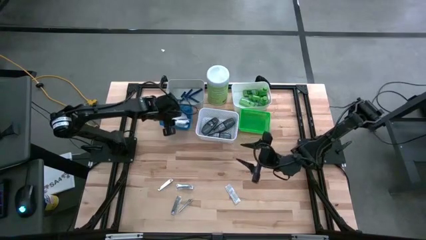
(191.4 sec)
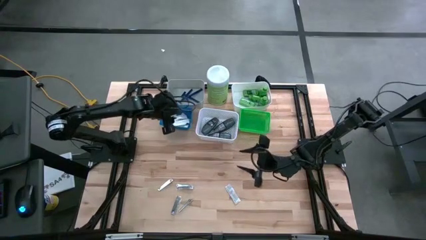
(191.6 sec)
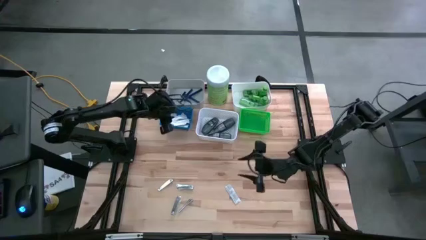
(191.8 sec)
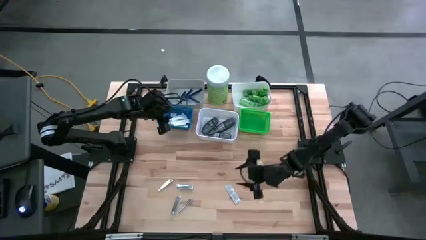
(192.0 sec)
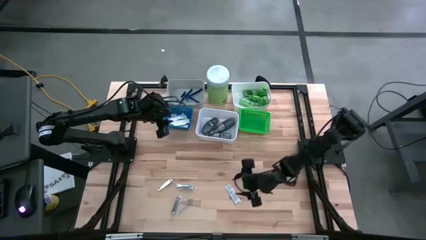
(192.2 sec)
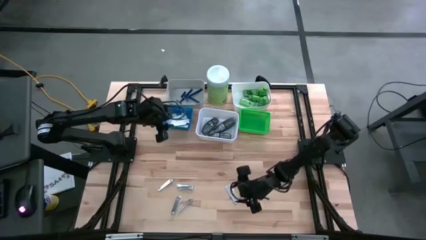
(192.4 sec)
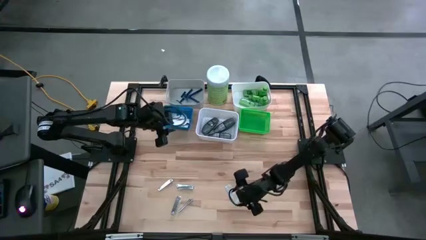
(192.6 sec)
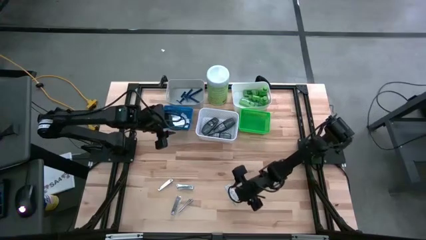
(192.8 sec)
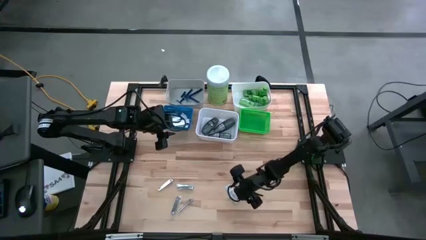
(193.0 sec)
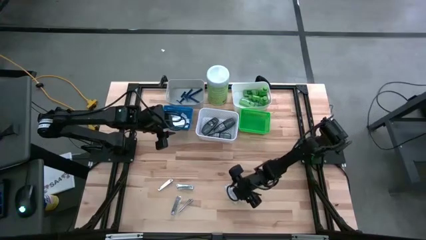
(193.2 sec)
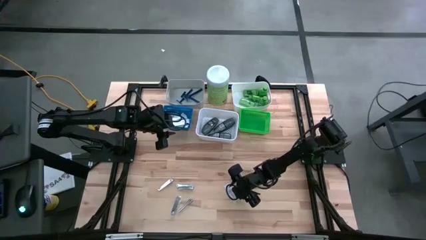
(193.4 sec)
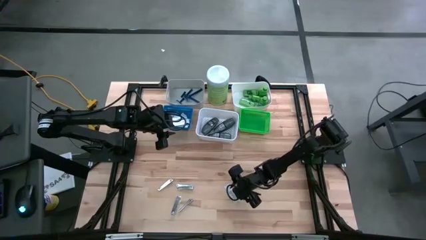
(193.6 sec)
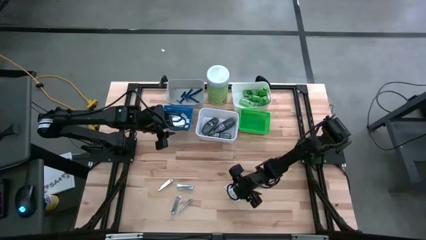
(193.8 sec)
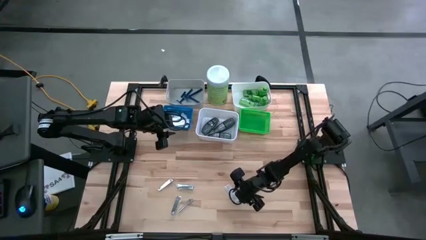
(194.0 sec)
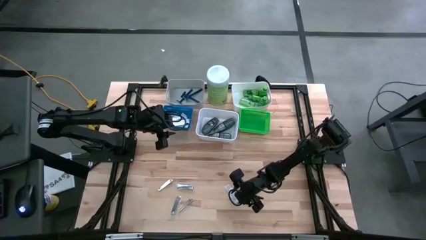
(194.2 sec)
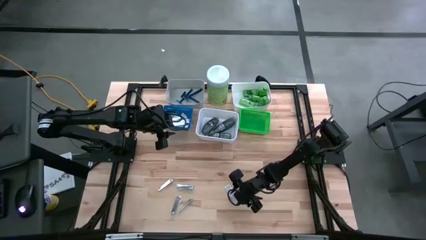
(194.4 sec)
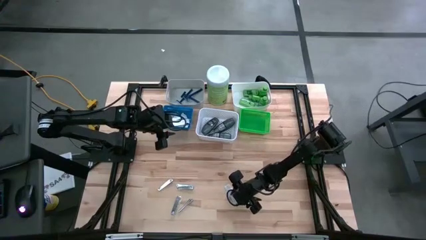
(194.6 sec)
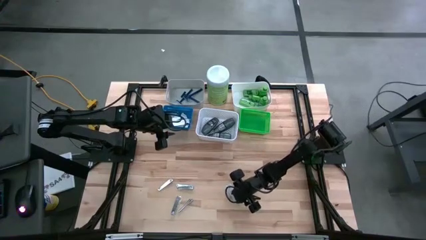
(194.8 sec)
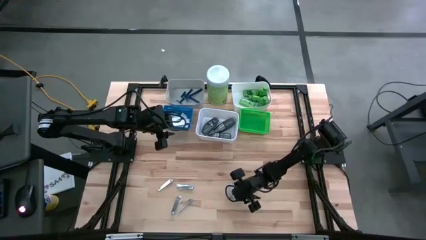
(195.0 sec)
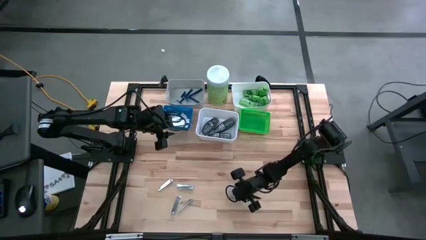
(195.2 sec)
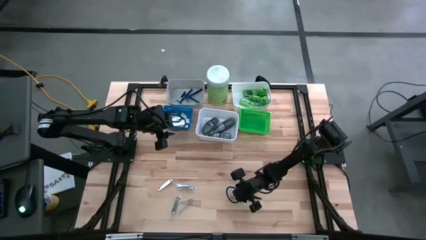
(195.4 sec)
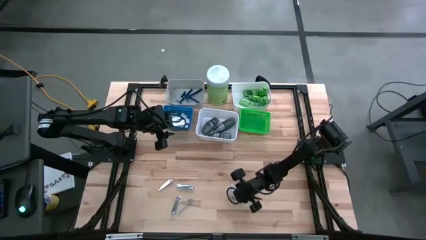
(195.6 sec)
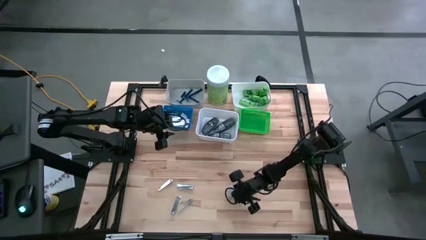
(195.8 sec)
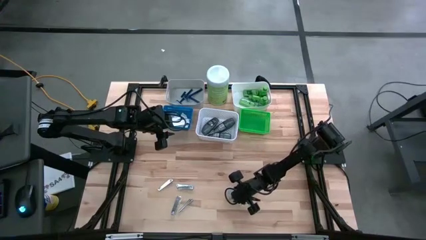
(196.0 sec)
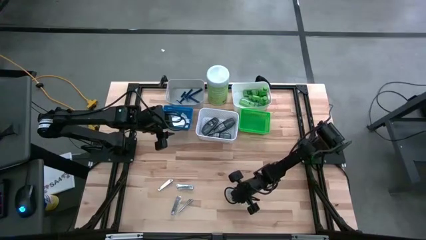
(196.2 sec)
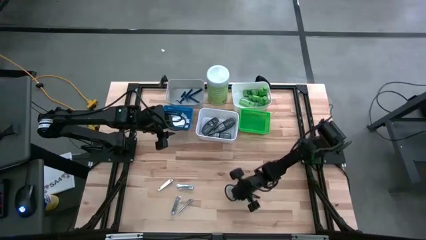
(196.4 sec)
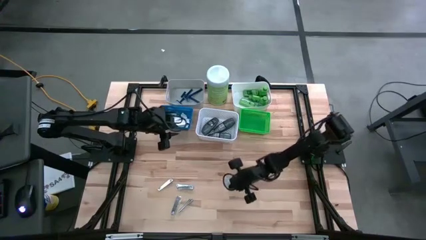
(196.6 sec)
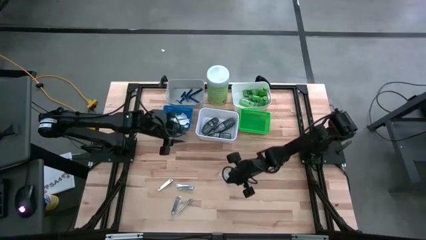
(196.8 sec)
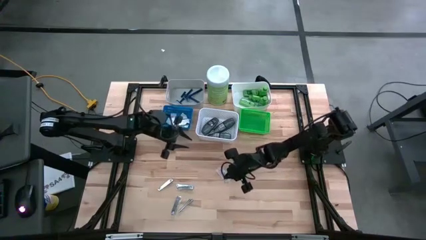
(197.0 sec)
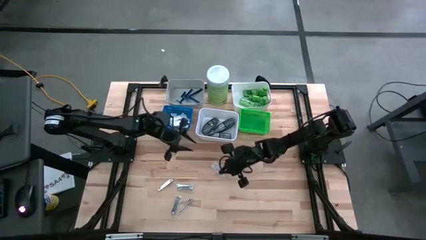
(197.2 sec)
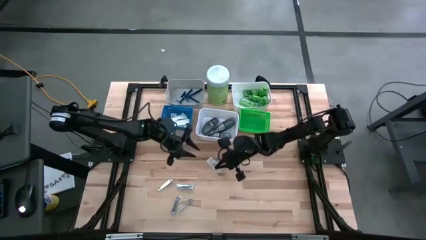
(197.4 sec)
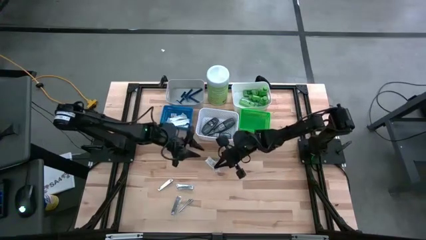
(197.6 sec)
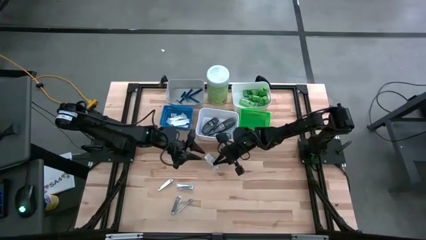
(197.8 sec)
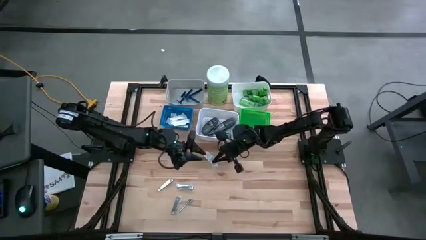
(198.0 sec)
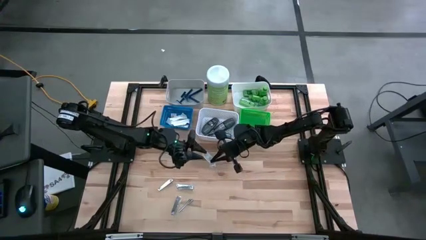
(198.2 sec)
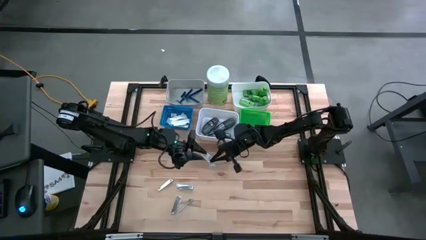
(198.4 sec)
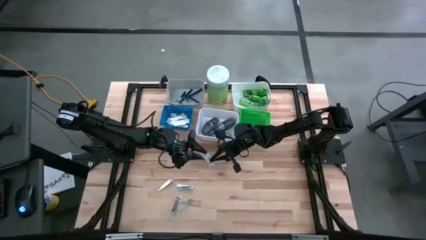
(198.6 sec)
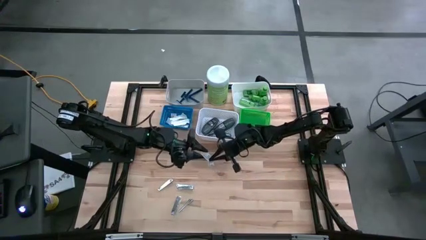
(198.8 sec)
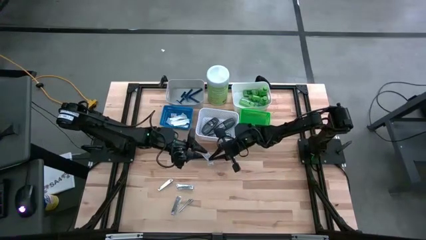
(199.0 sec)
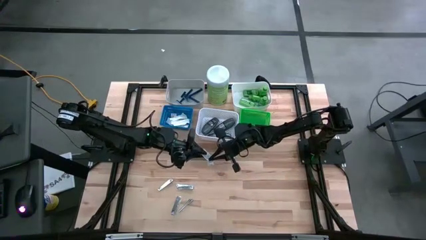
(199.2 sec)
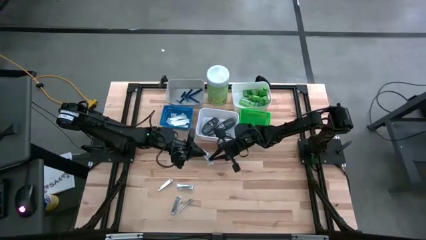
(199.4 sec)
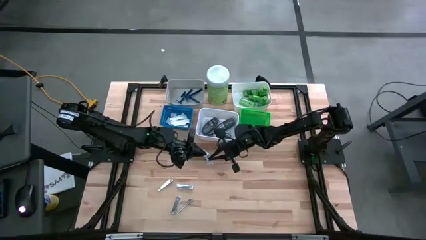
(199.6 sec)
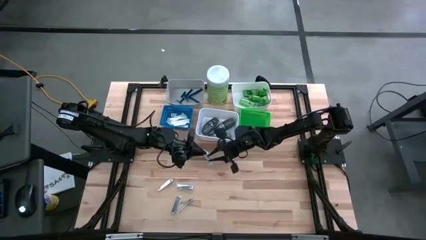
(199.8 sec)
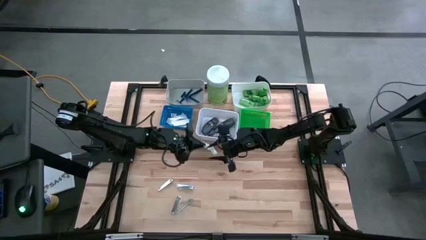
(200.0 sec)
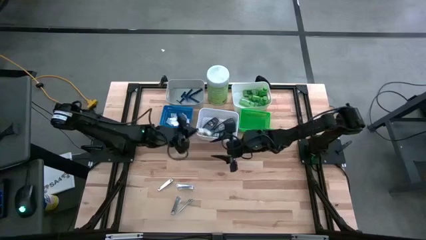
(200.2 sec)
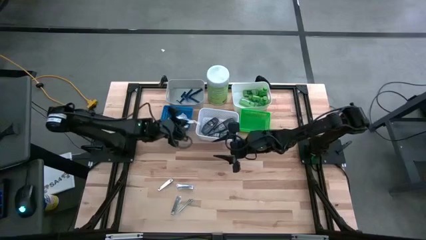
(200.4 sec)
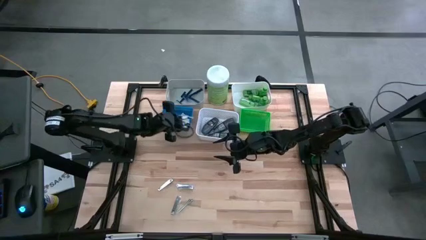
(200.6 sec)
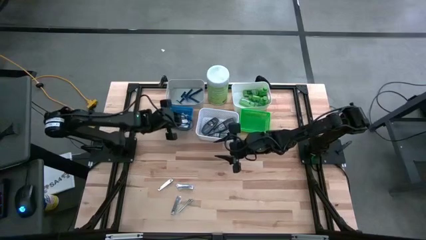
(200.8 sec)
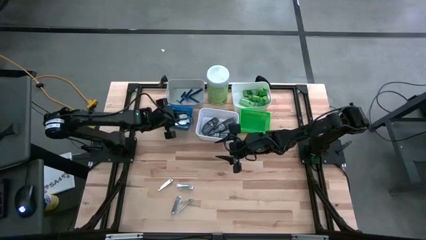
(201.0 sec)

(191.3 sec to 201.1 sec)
Task: Pick & Place Travel size toiletries
Put the white bandage into the blue bin

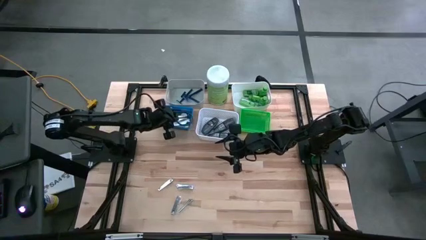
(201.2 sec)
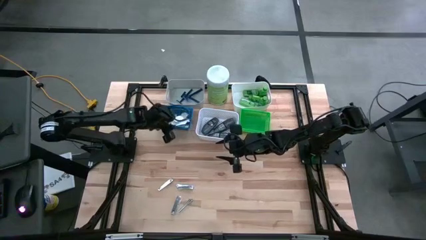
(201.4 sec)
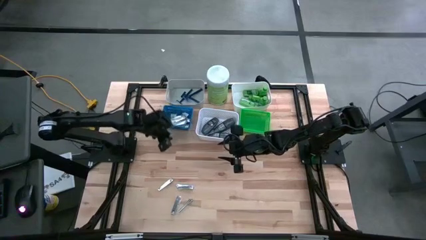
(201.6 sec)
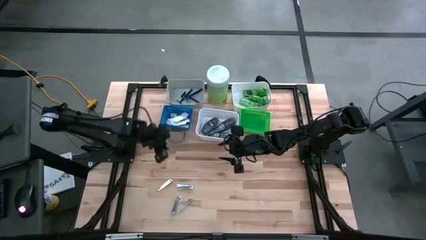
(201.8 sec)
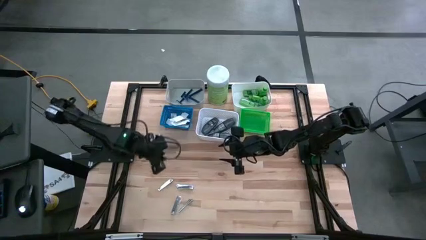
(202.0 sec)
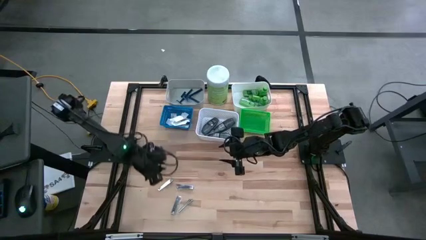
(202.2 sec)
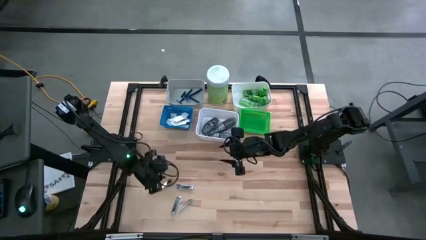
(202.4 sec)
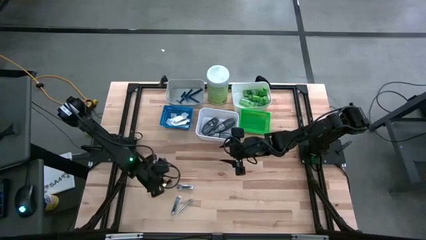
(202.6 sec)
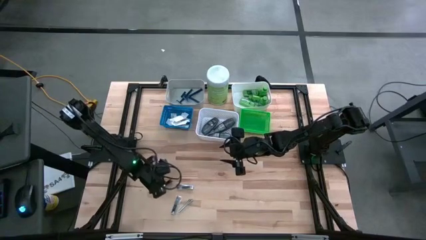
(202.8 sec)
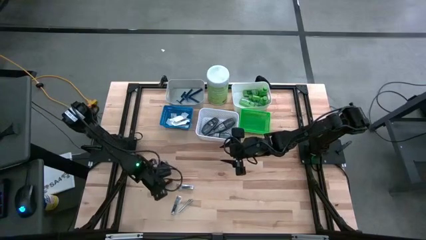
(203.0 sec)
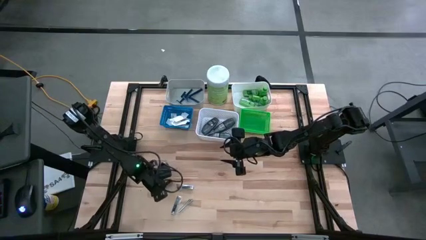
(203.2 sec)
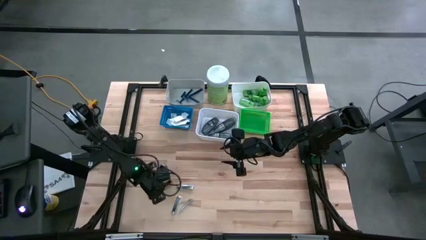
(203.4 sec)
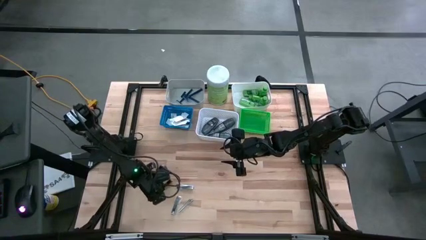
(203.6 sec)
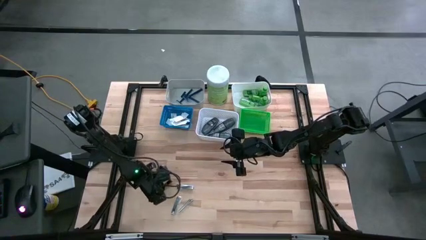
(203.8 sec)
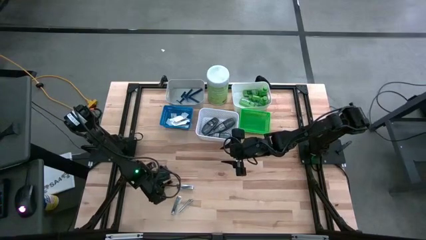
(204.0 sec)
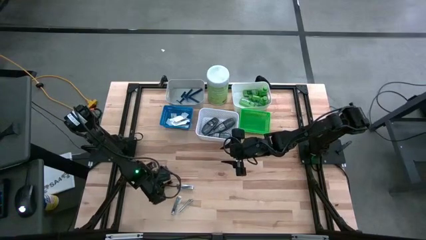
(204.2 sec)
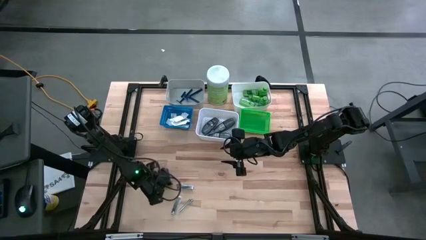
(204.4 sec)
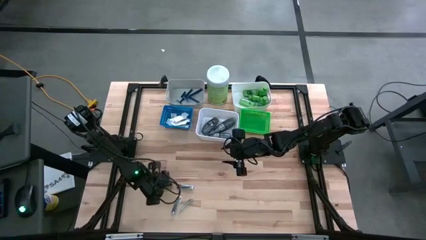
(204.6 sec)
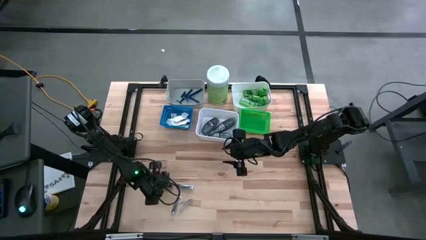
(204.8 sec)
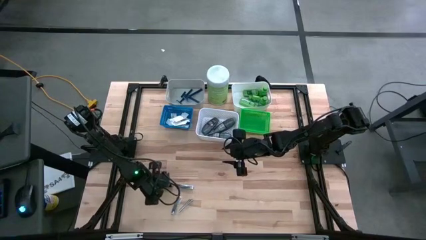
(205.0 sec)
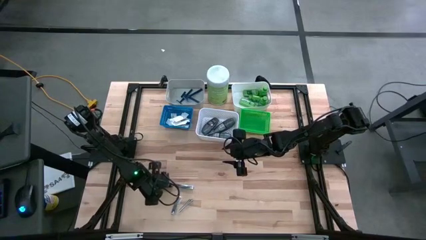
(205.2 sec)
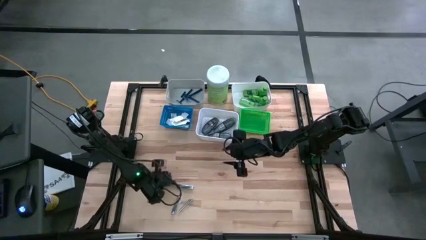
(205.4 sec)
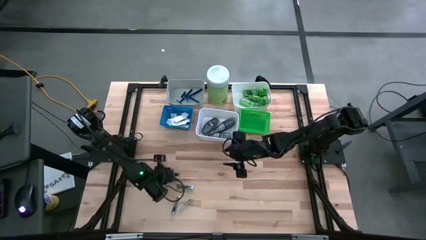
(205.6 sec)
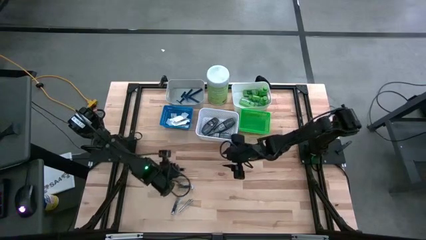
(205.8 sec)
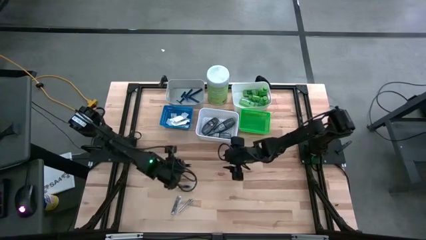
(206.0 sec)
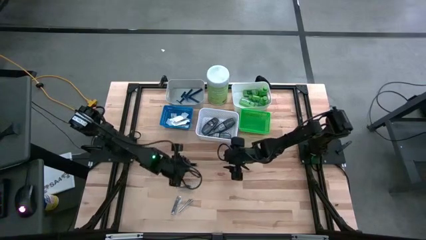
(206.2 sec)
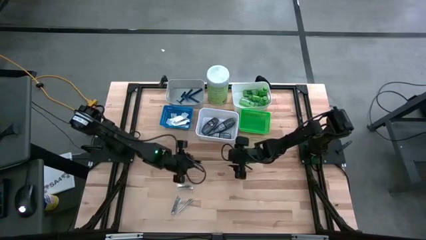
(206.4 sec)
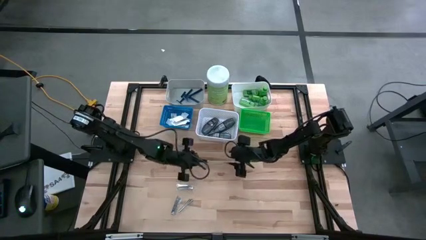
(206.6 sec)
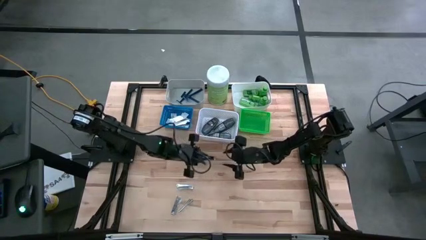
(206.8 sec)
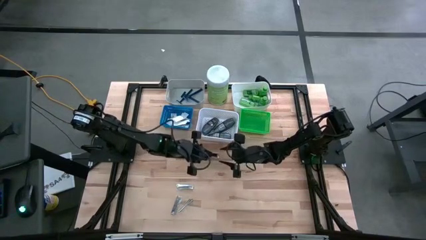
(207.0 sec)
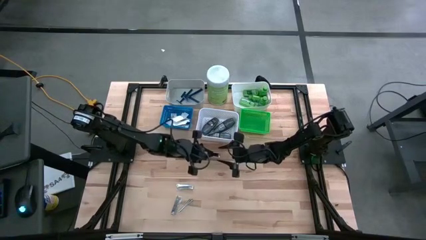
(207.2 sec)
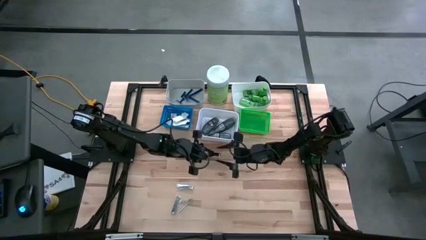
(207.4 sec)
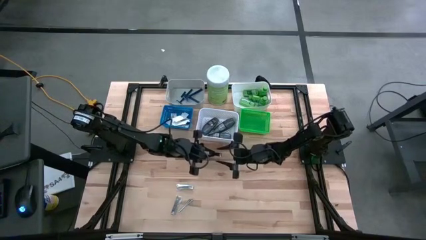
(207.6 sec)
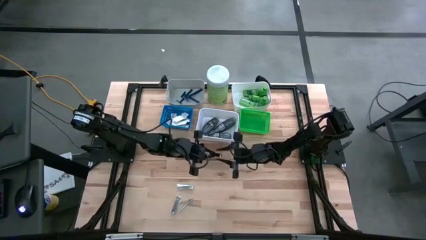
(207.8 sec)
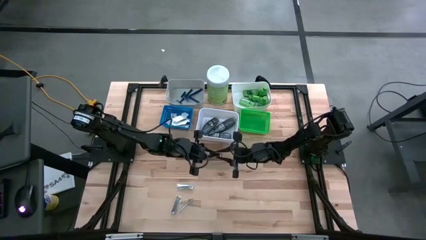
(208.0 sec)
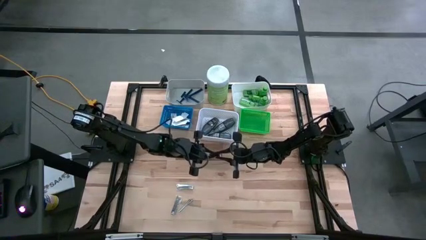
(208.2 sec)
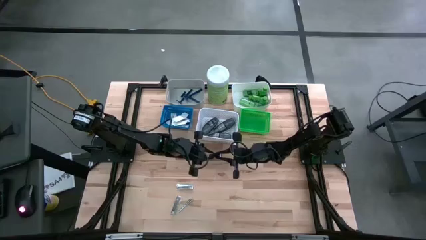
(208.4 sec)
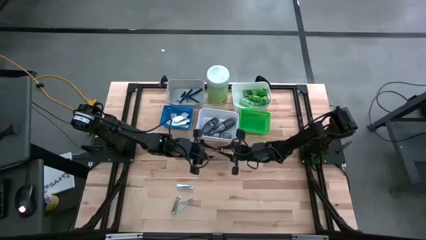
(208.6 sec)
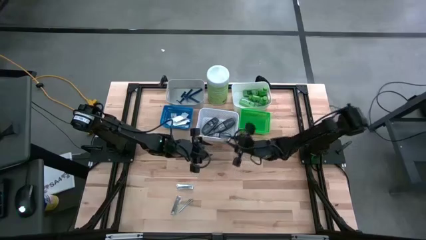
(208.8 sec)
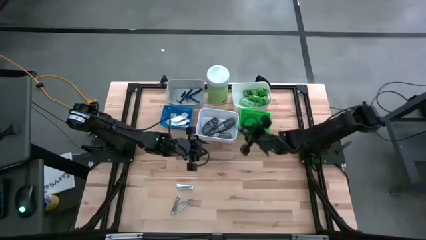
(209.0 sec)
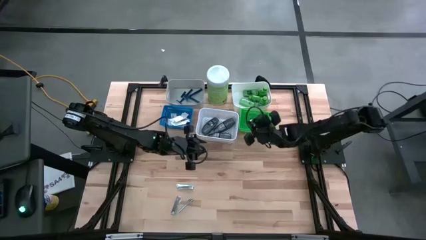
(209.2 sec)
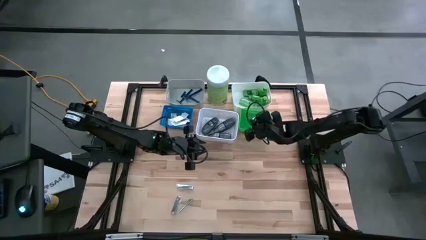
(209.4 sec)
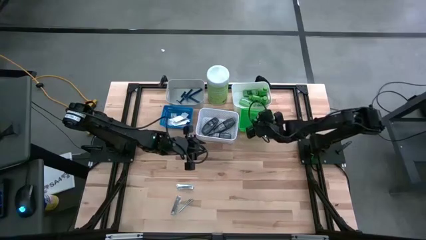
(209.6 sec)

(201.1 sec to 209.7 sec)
Put the silver nail cutter into the green bin
